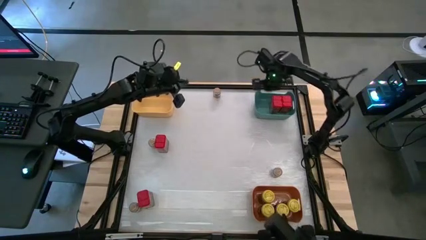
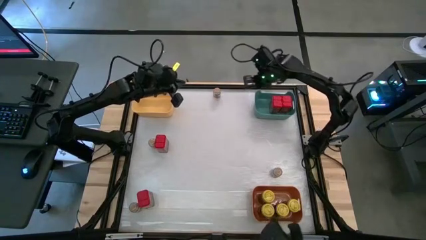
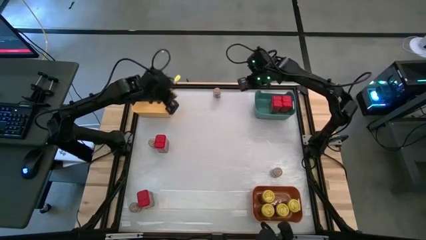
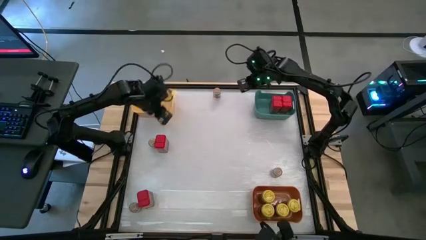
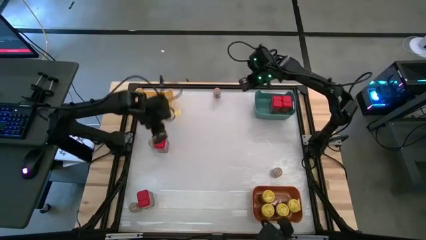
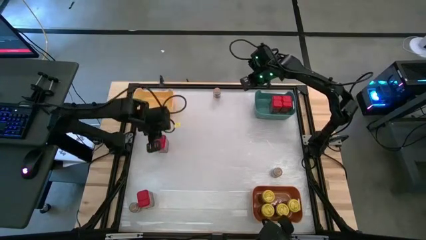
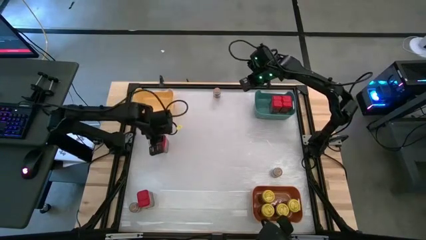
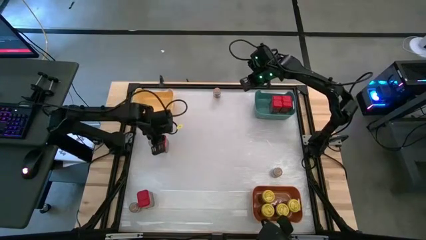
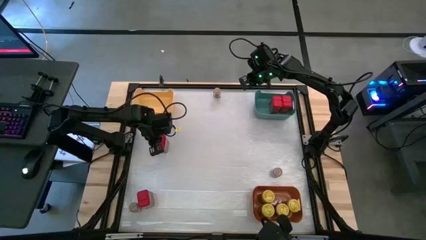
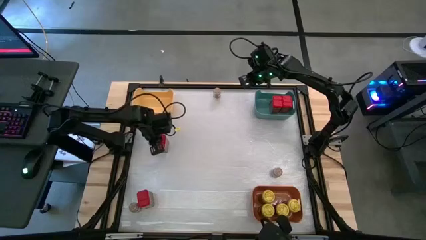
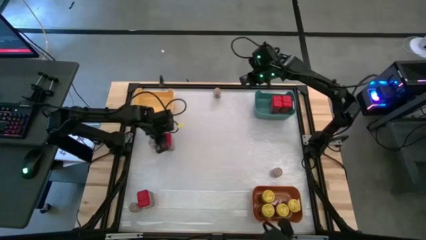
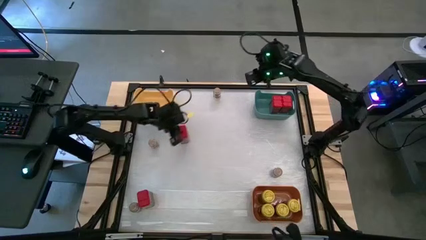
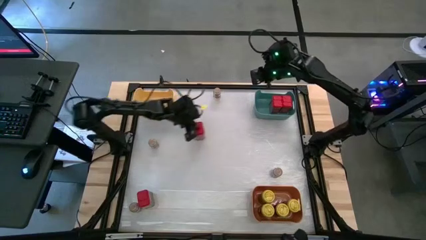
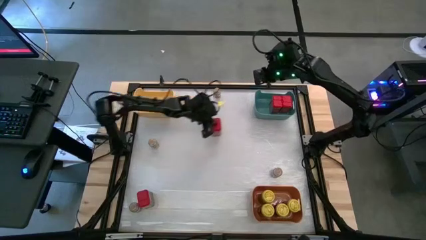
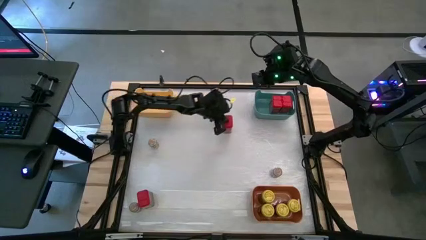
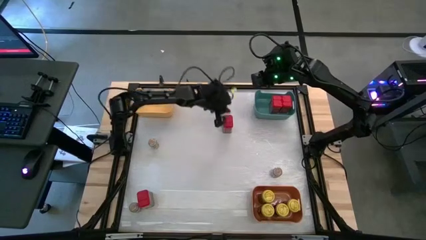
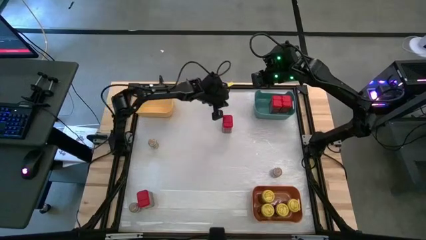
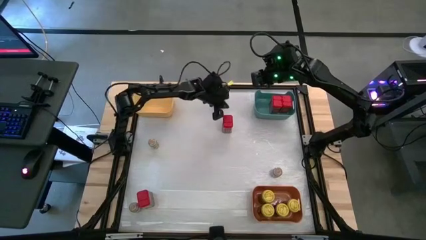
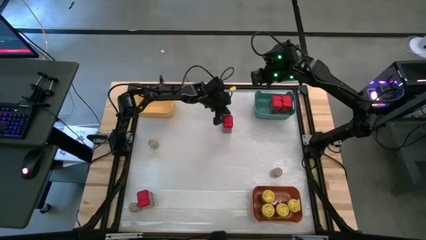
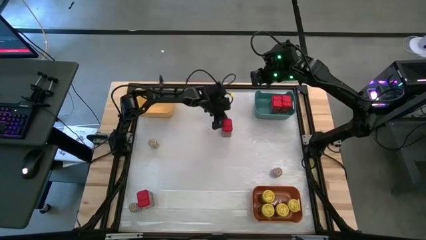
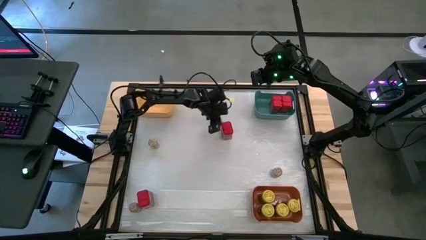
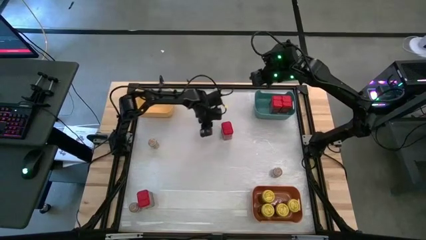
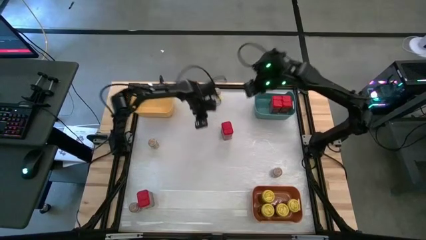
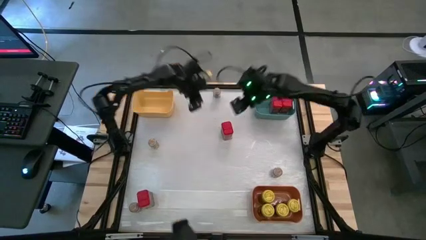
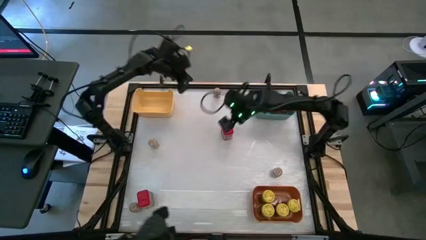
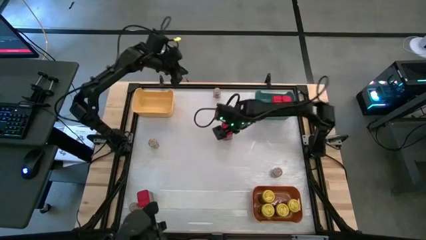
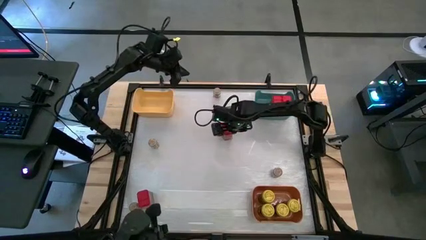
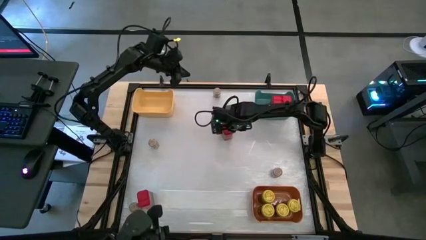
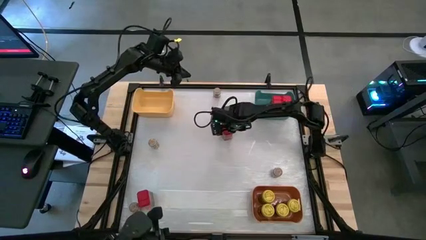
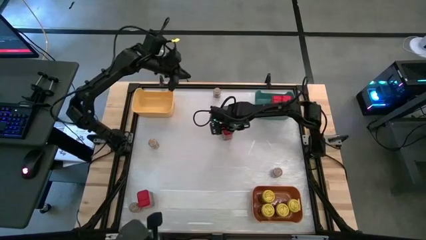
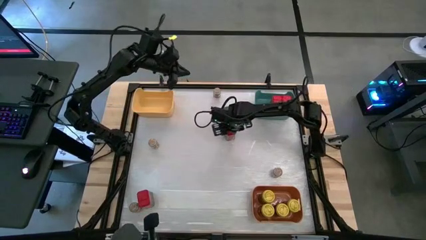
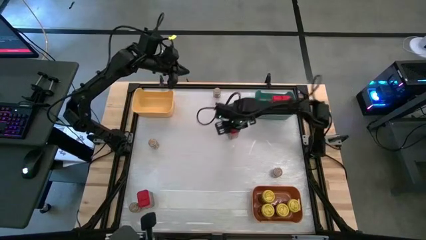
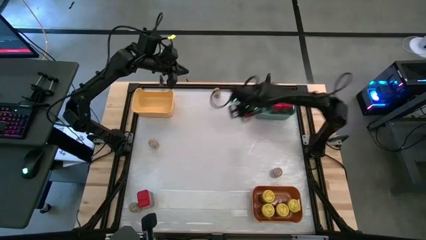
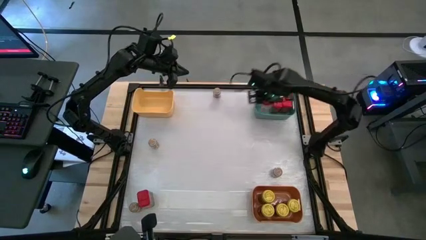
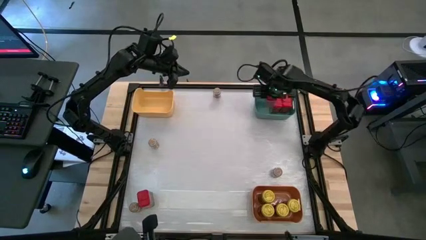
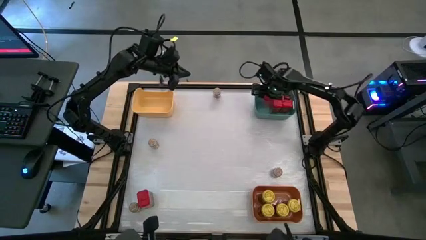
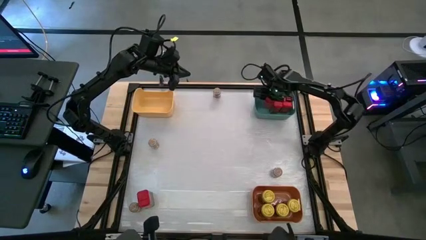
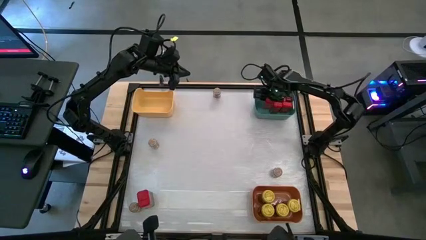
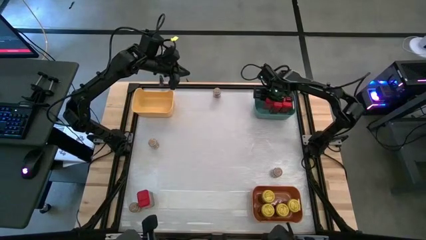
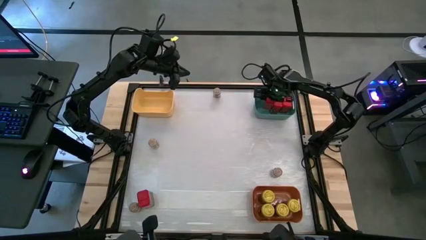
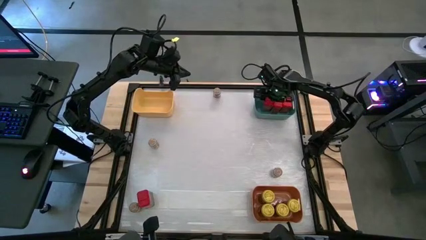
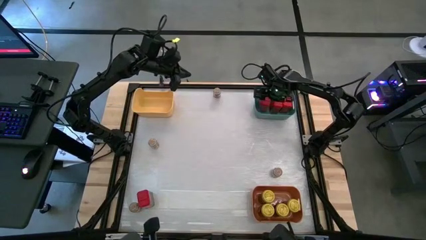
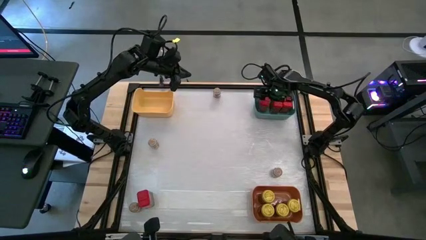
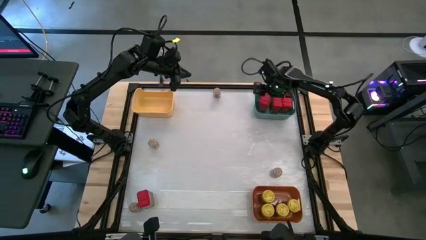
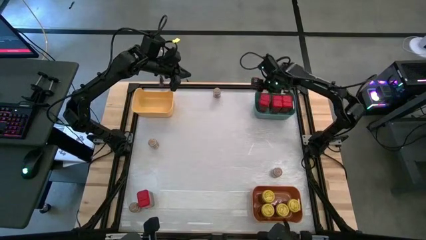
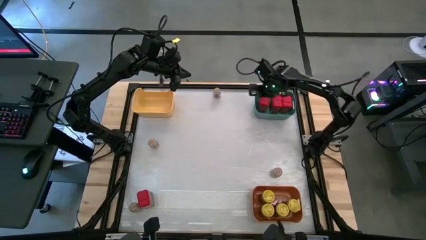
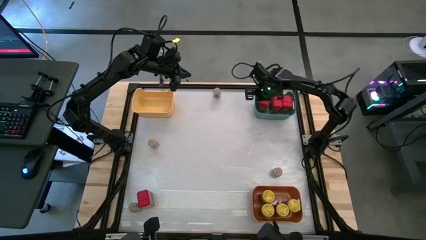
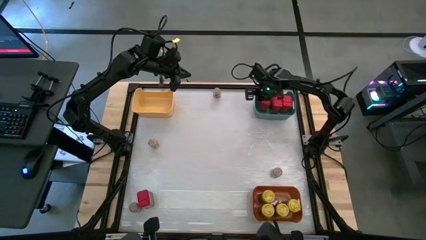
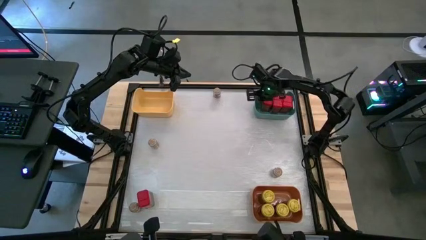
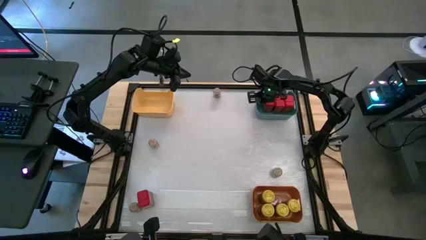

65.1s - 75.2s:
Task: Sort spices by type
Put the top red seasoning can into the green bin

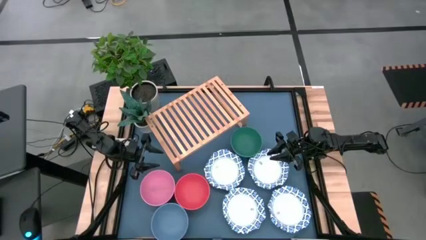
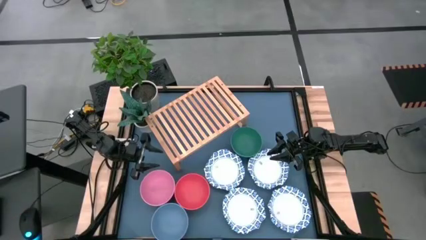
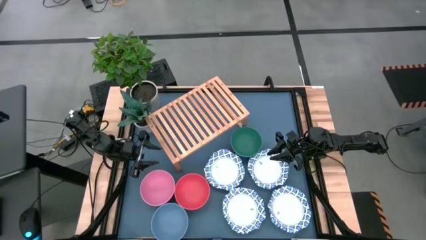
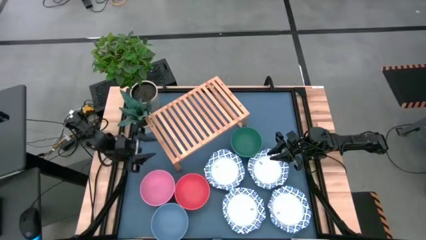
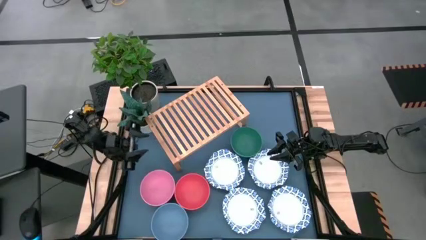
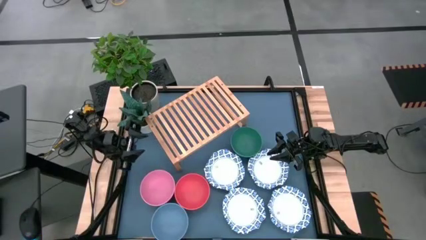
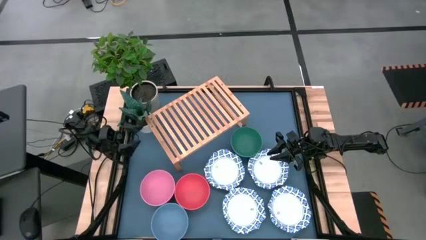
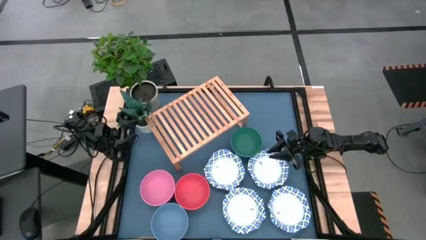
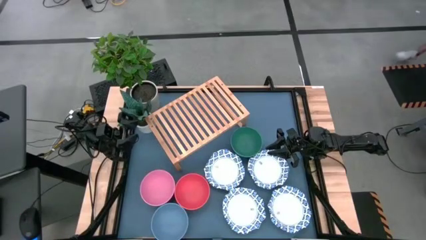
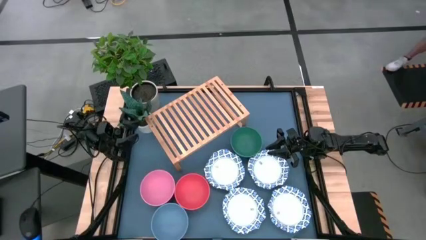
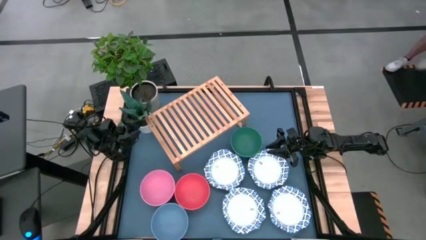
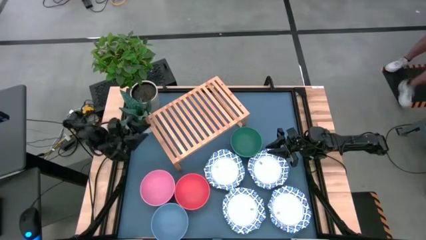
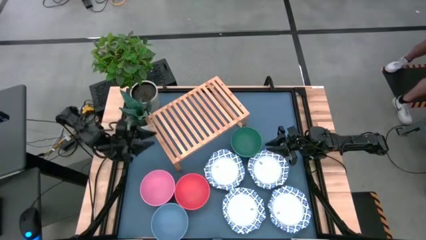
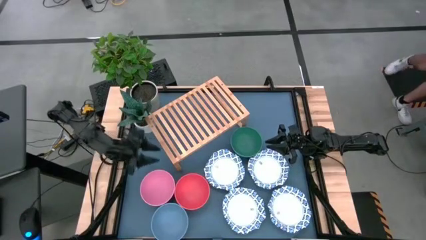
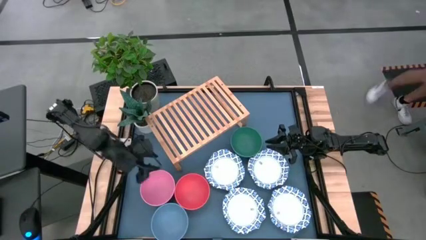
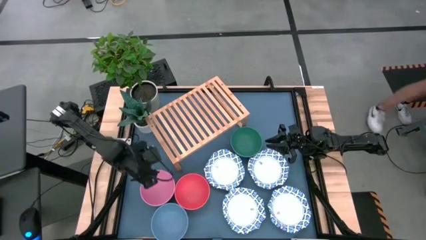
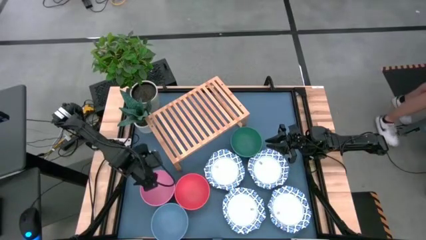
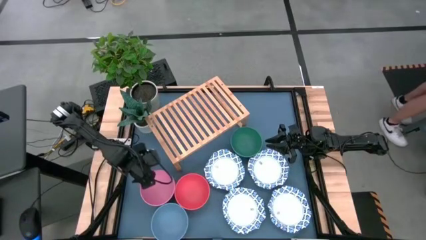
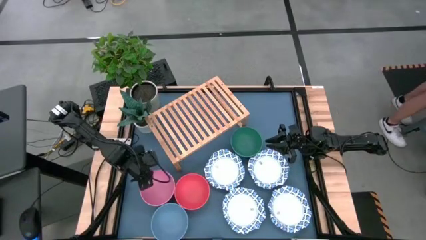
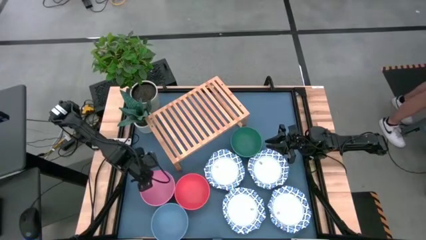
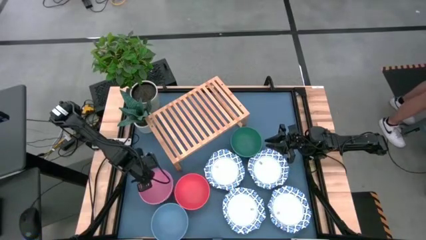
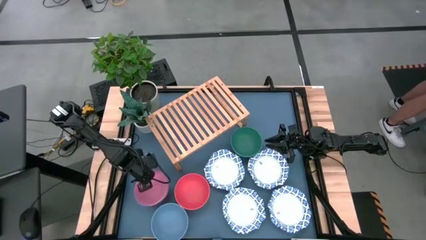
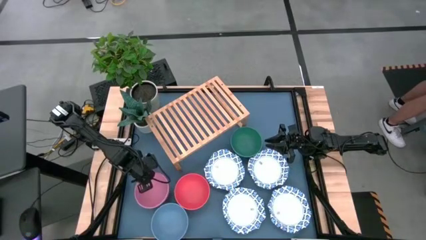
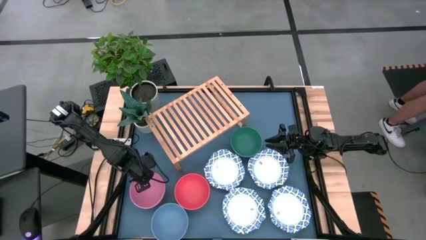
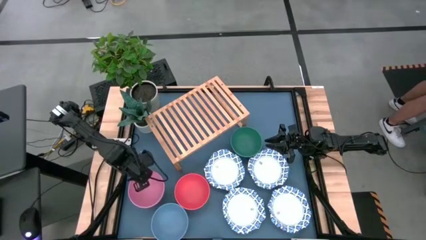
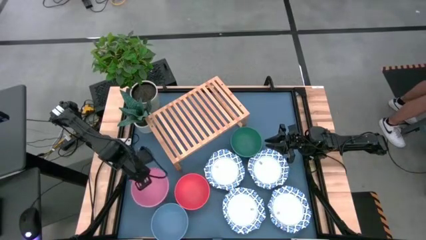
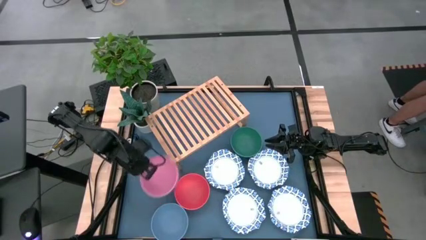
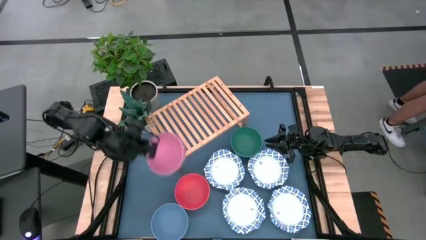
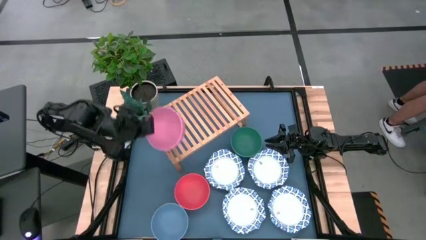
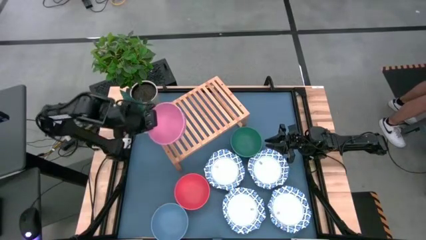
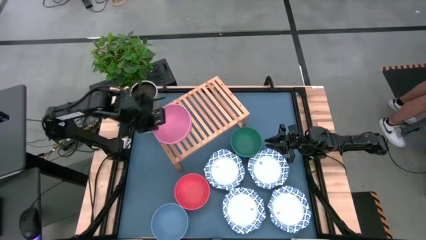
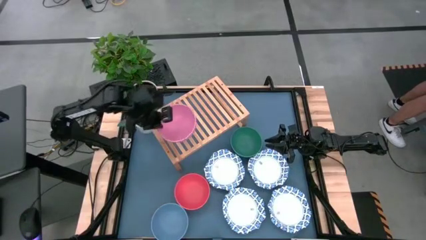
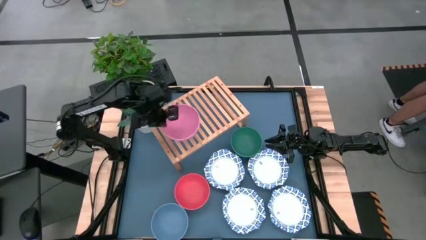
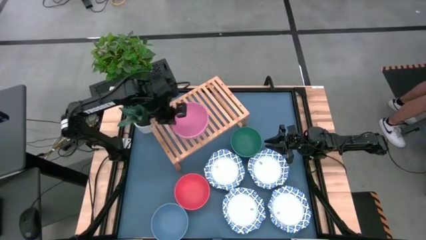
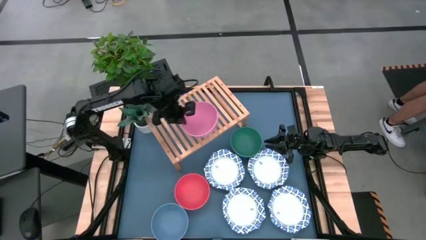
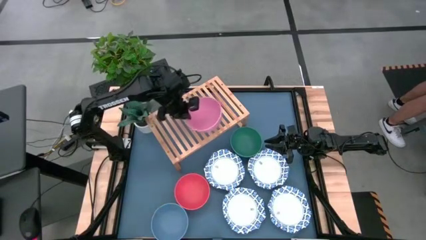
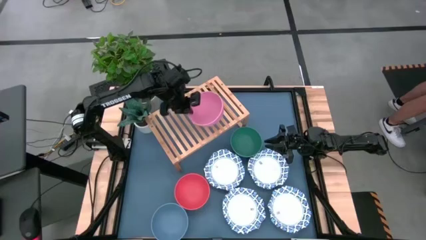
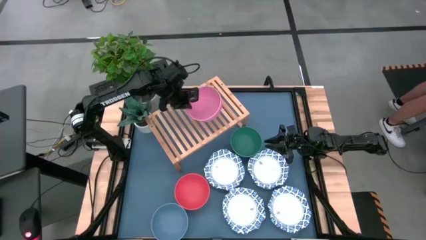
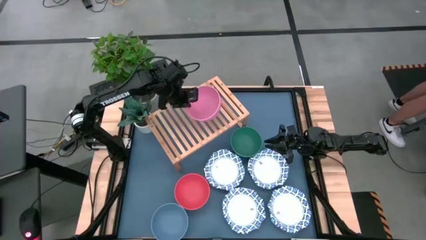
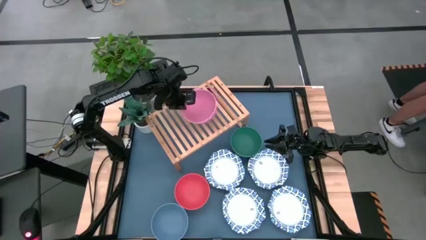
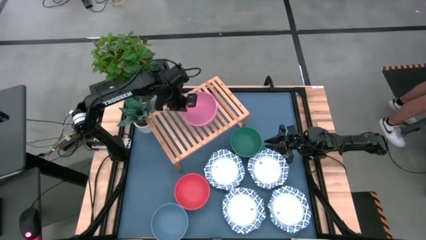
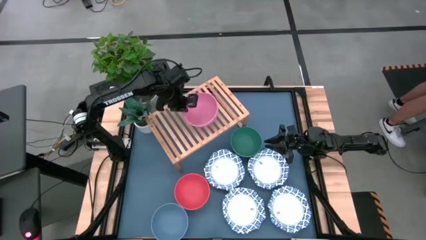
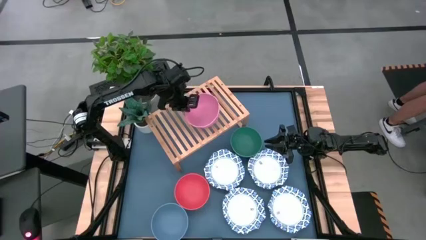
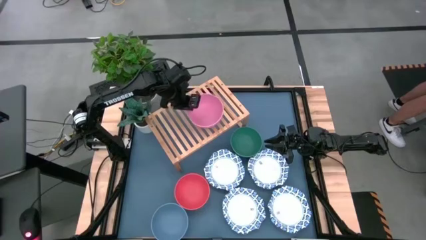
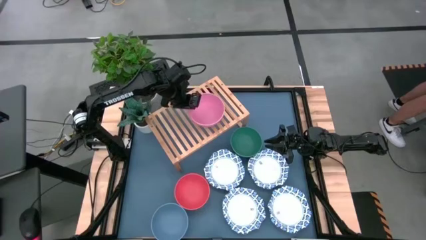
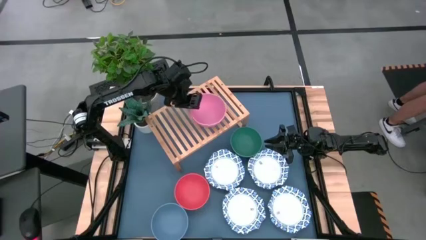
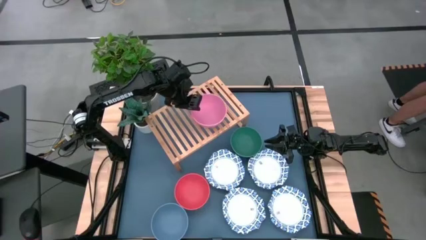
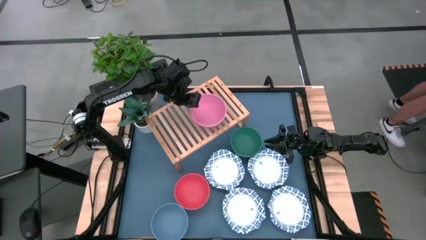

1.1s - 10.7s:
Task: Place and stack bowls onto a shelf
Put the pink bowl on the shelf
